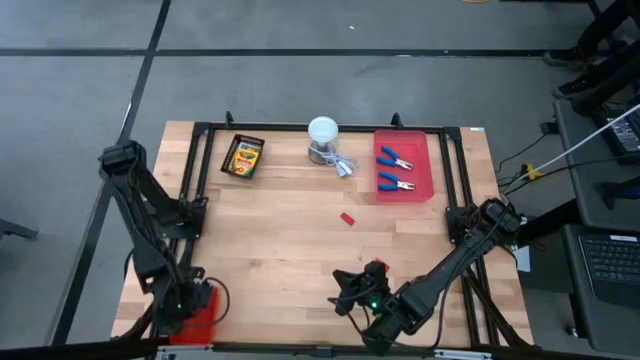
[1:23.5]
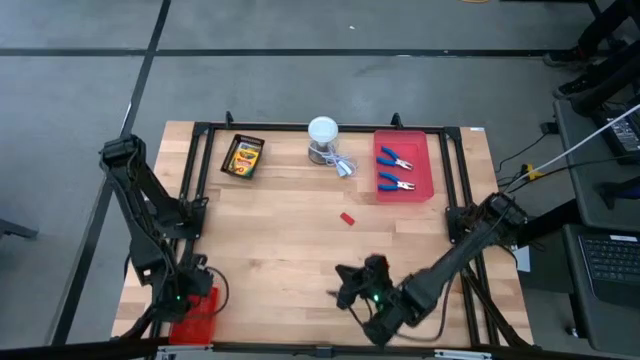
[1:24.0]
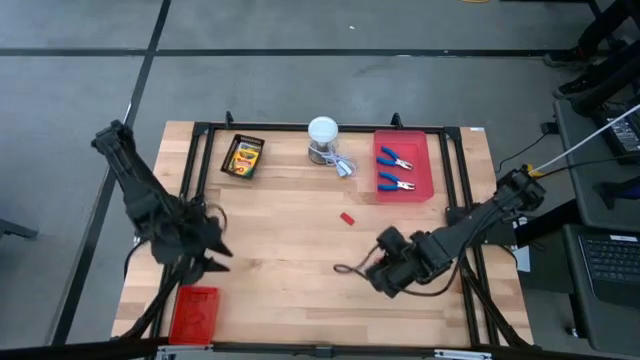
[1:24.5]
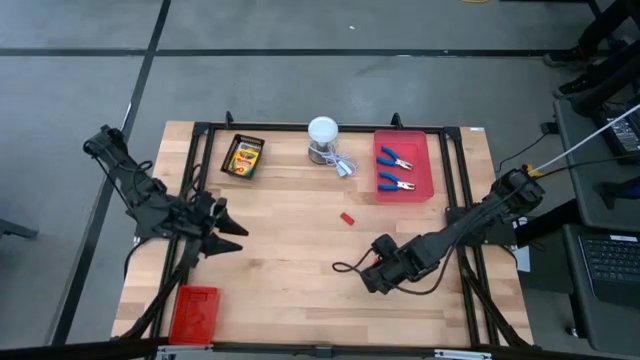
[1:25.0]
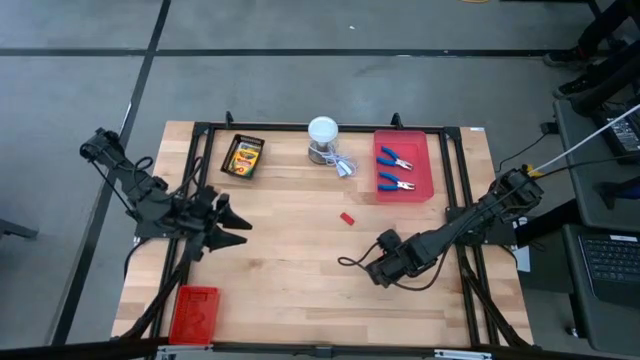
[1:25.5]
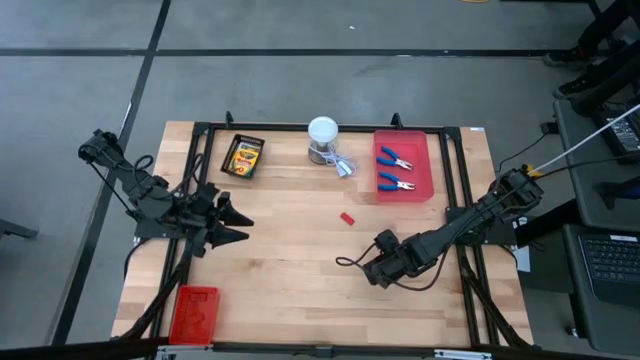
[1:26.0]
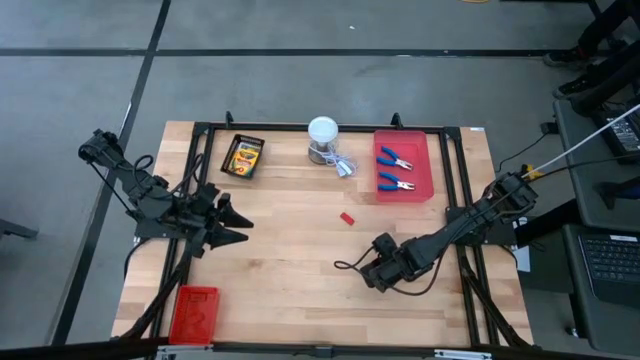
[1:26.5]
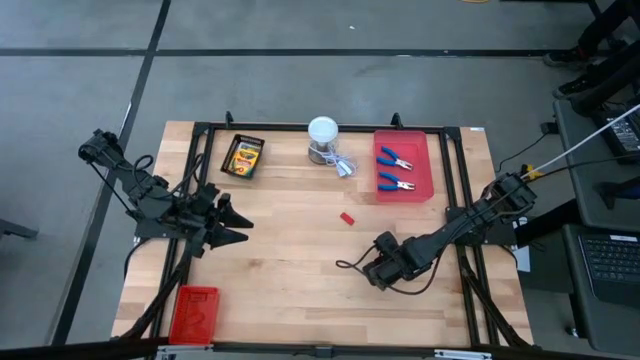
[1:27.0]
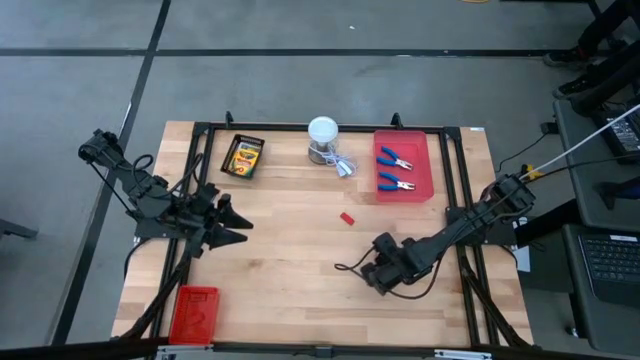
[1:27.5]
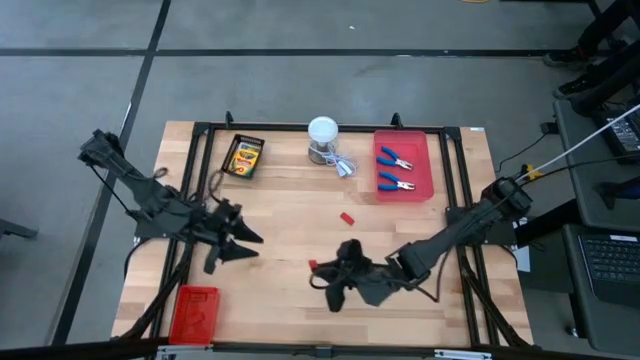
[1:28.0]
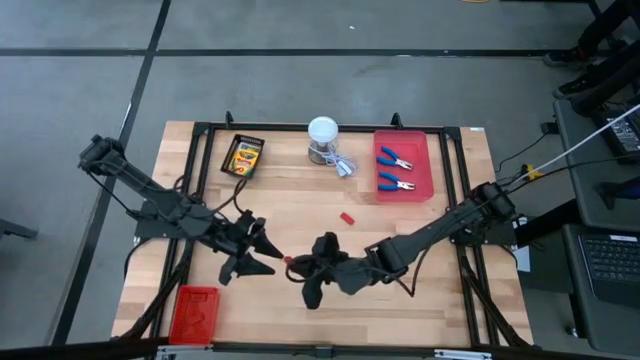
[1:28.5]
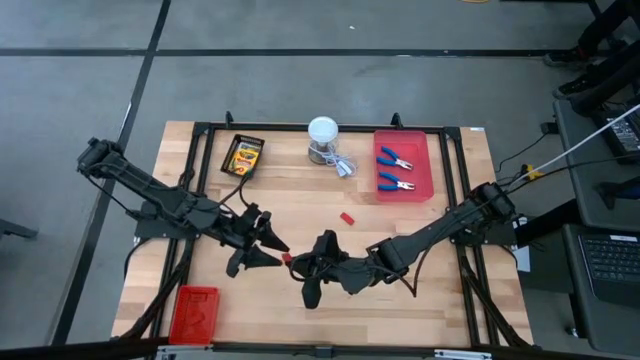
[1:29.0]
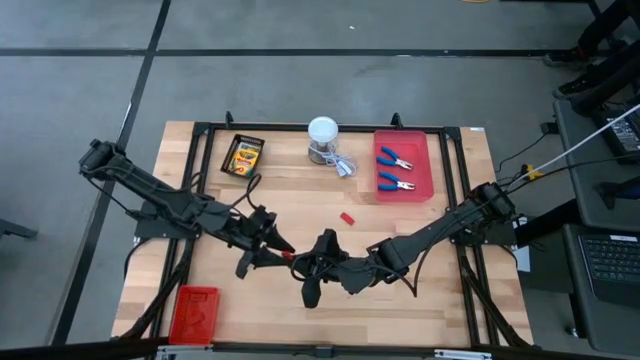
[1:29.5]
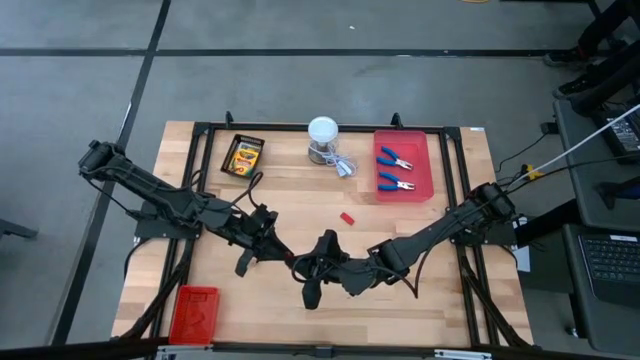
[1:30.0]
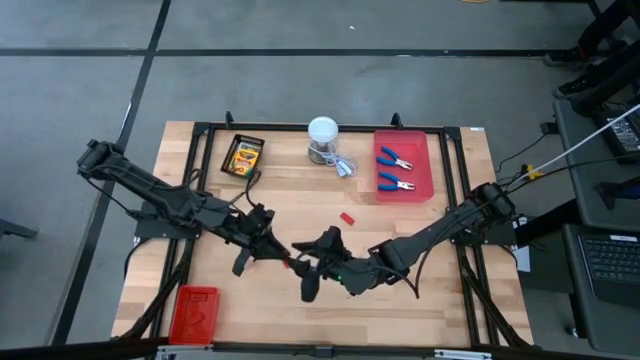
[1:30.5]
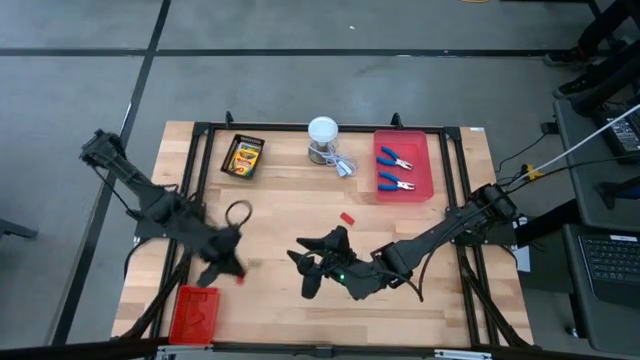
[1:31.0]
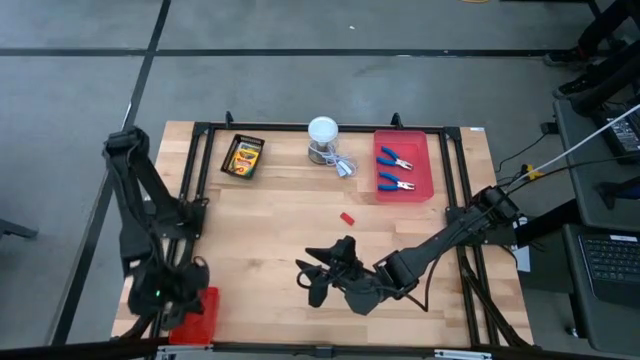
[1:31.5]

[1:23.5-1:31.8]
Task: Pick & Place School Supplies
Put the red eraser into the red bin

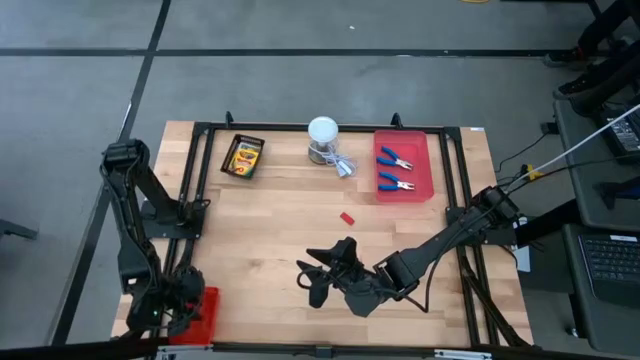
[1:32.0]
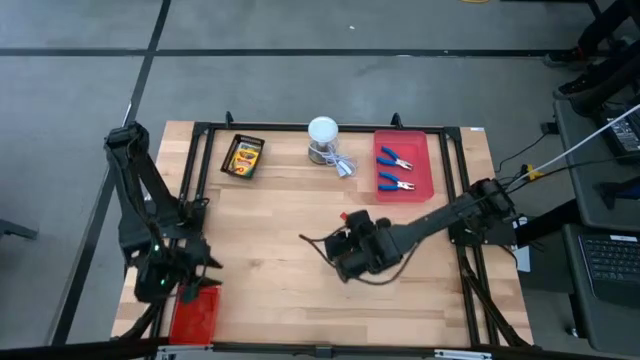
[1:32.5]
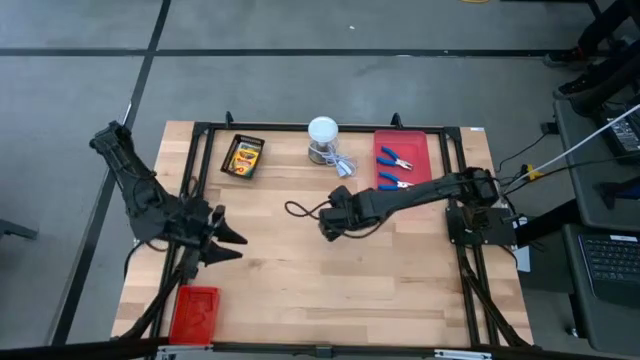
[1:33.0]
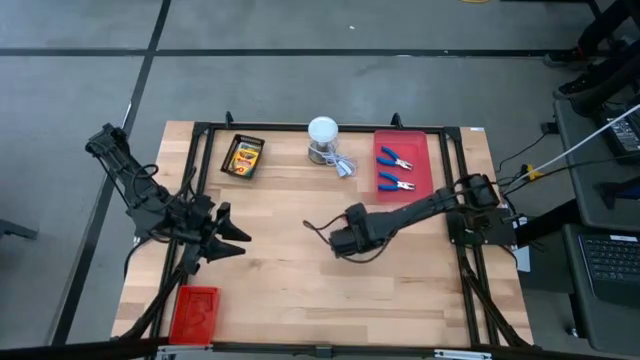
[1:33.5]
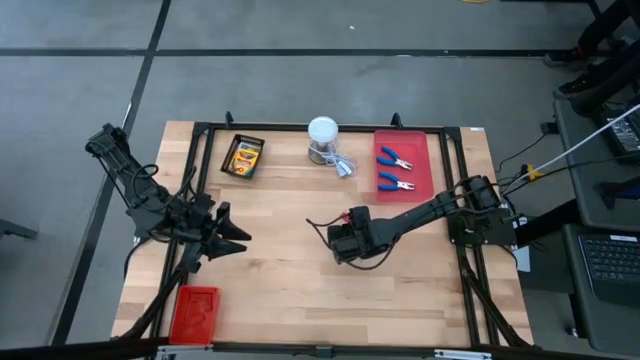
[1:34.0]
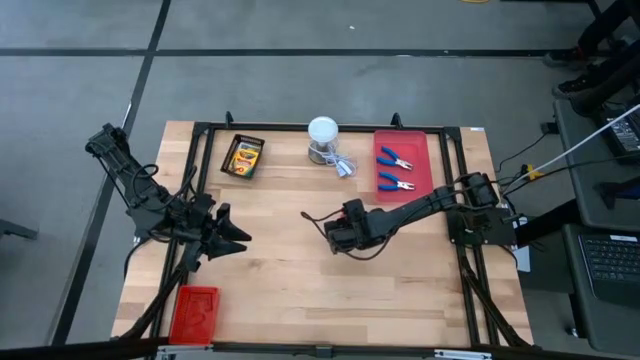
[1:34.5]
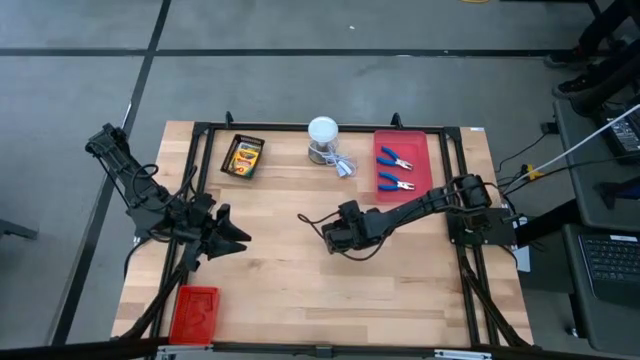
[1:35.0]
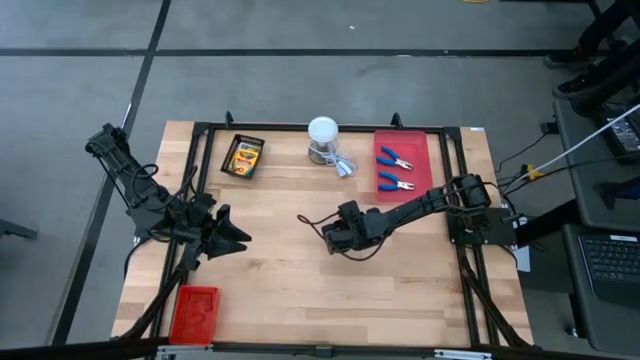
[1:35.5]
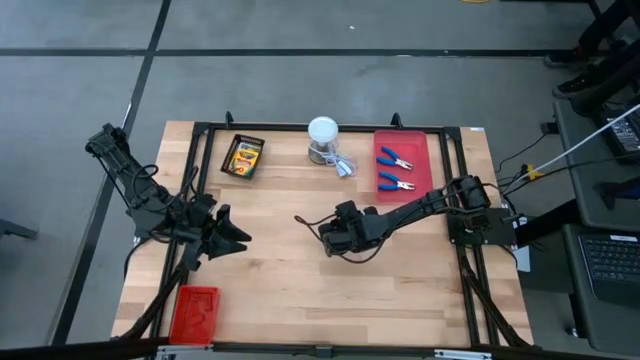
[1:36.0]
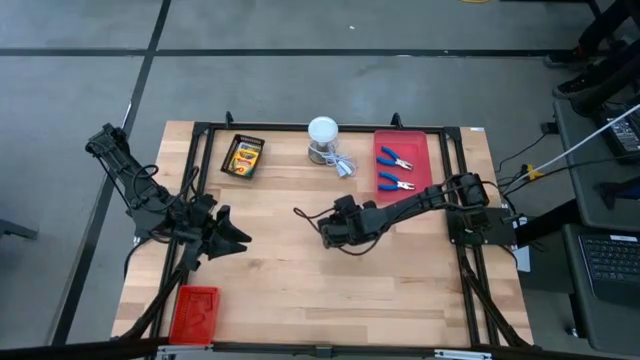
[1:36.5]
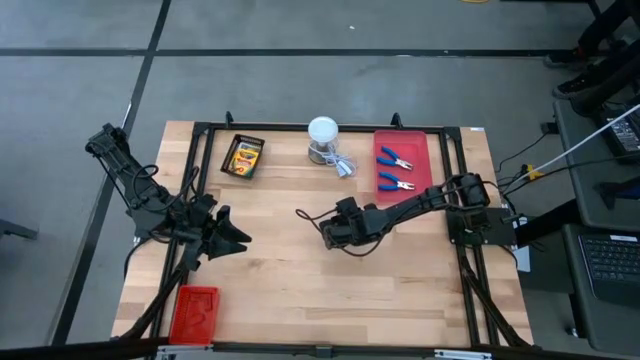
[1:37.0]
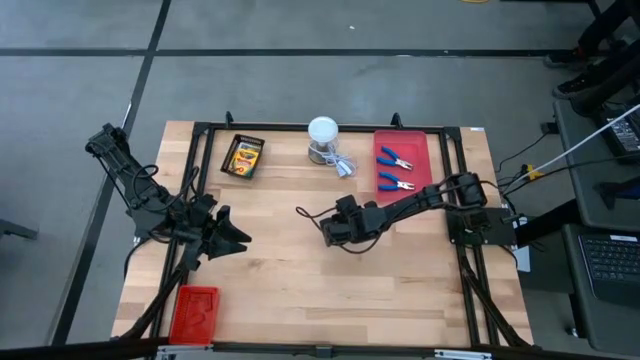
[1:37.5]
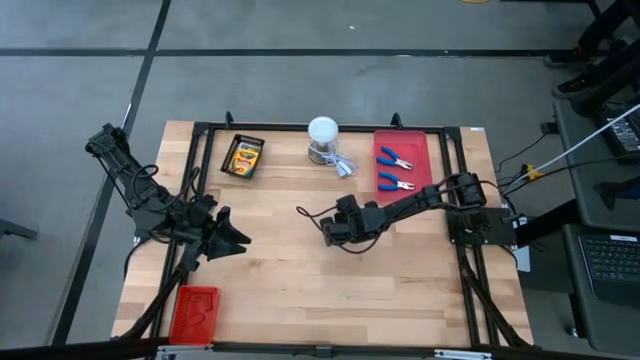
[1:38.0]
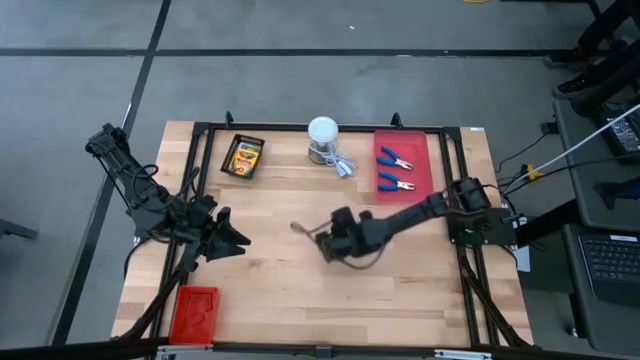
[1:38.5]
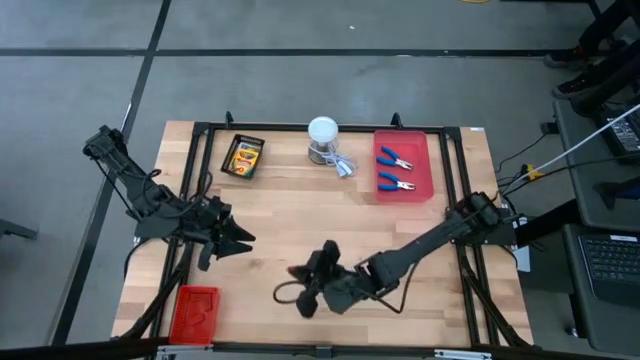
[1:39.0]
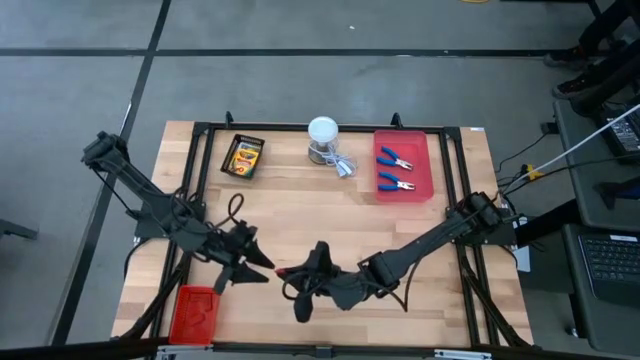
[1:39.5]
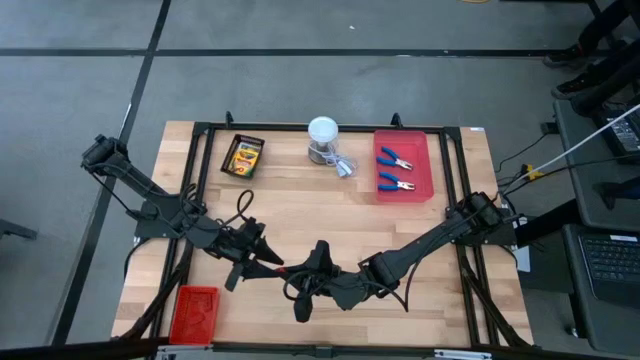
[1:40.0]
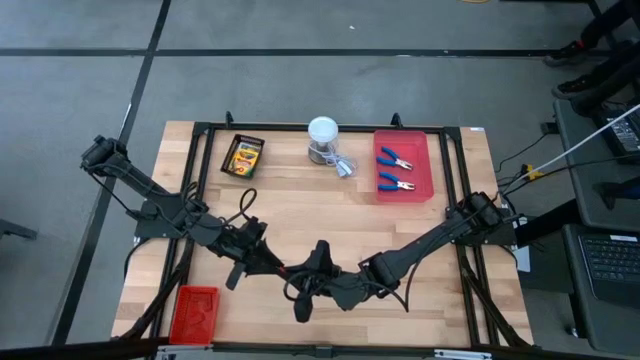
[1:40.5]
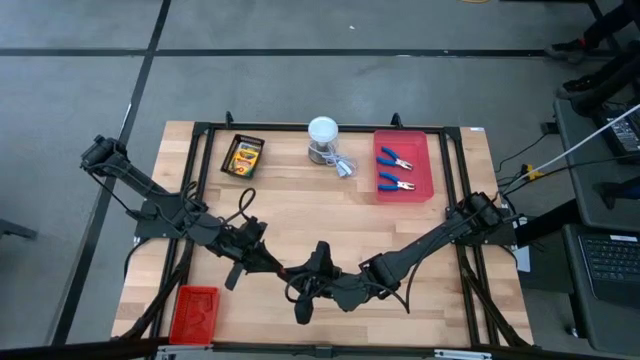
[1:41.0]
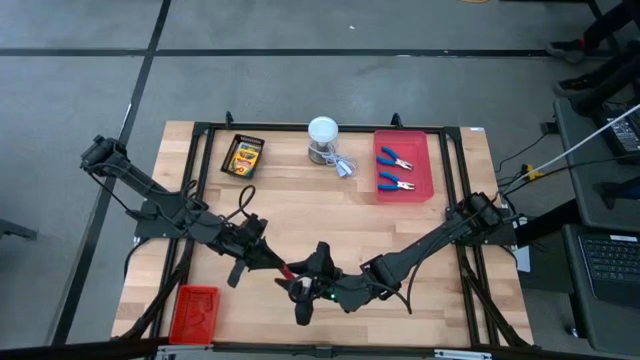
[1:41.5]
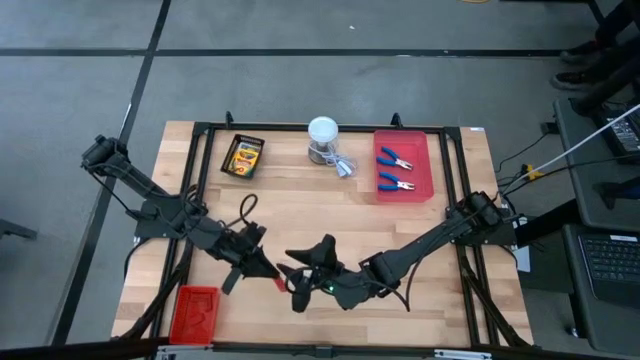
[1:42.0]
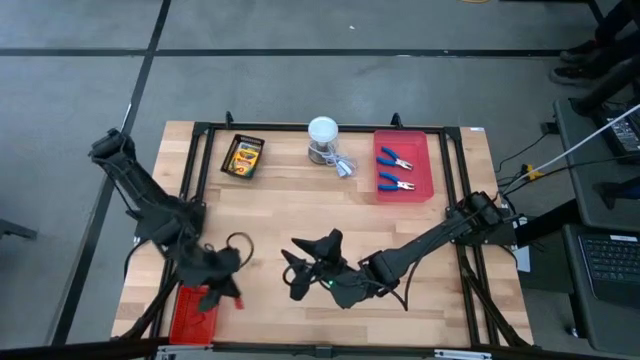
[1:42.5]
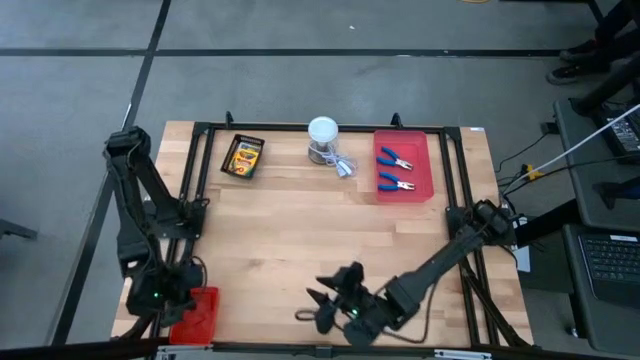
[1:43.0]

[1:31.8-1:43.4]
Put the red eraser into the red bin

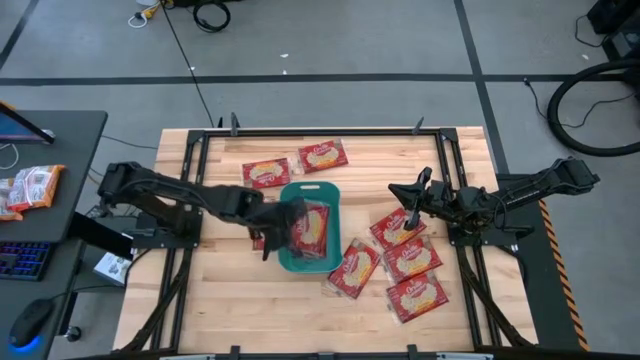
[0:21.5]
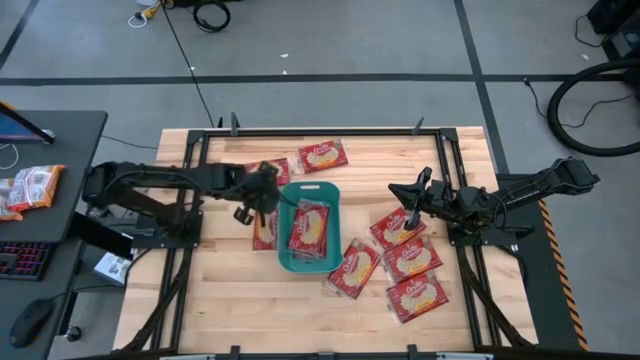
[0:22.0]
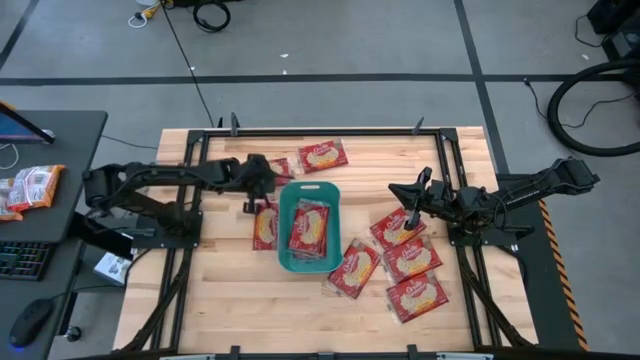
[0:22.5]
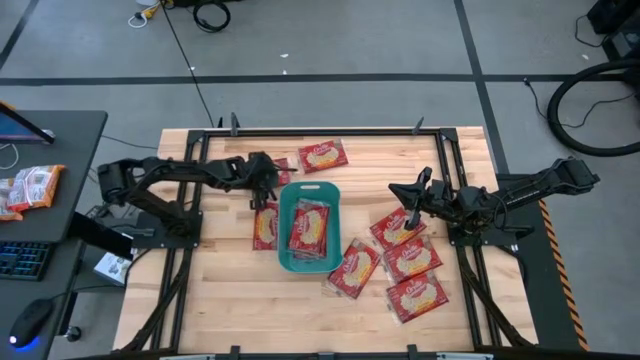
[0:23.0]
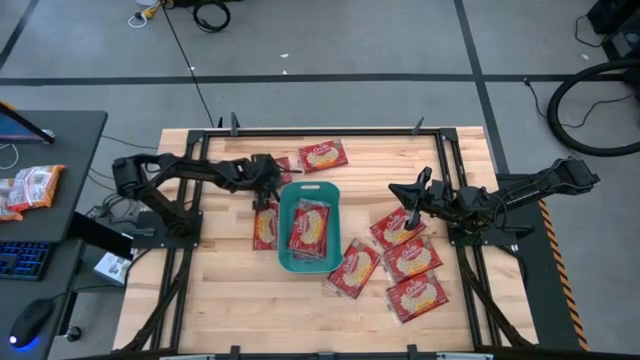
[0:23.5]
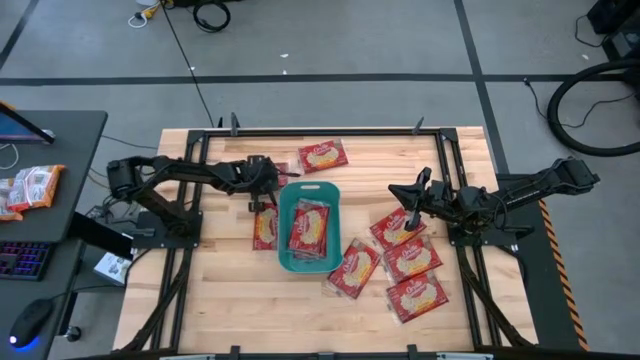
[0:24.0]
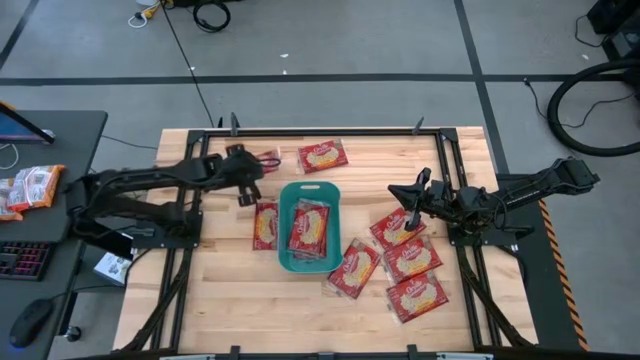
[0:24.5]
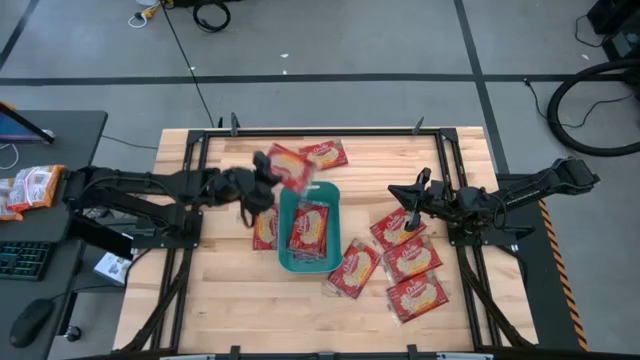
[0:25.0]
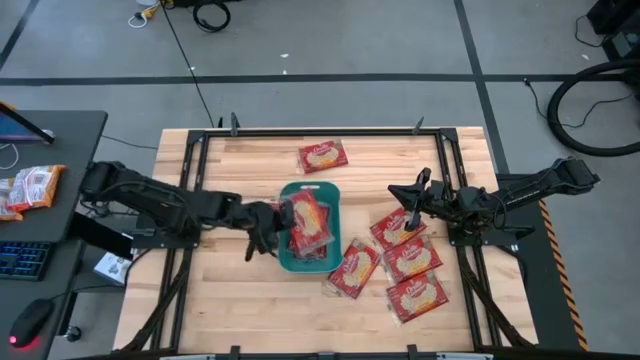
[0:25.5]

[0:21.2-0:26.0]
Task: Sort popcorn bags into baskets
Put the red popcorn bag into the green bin
